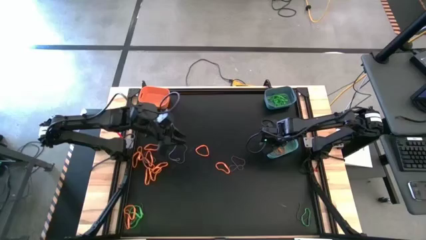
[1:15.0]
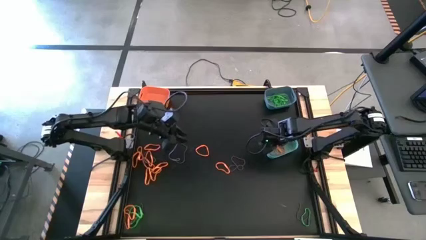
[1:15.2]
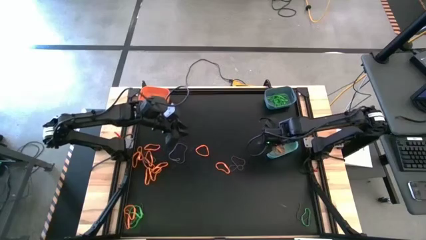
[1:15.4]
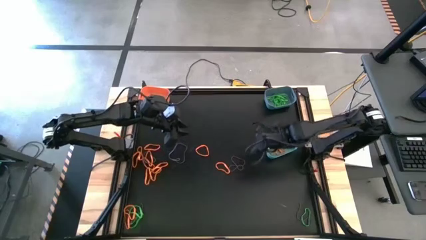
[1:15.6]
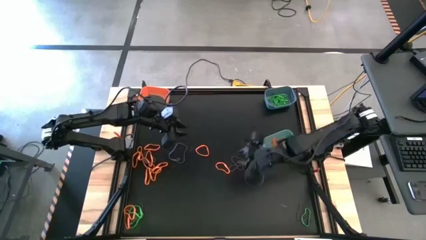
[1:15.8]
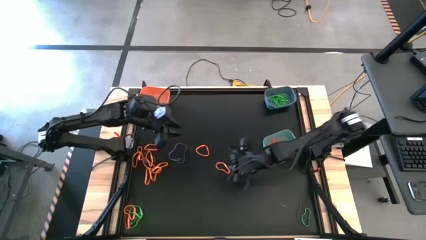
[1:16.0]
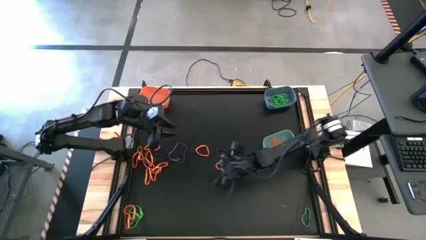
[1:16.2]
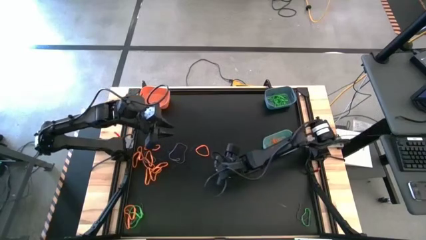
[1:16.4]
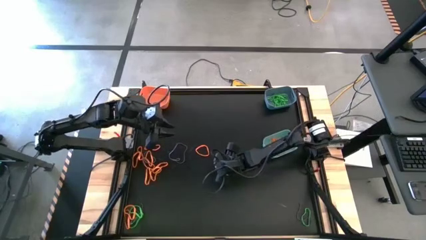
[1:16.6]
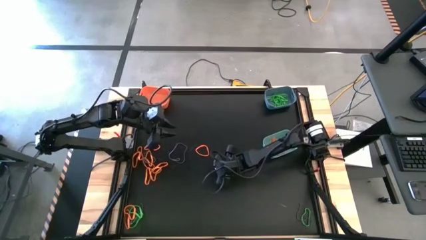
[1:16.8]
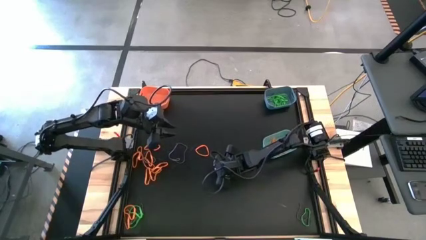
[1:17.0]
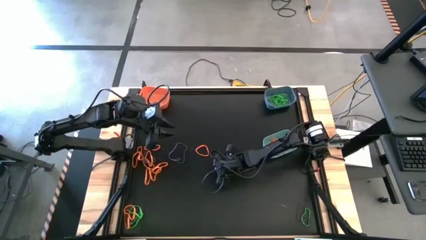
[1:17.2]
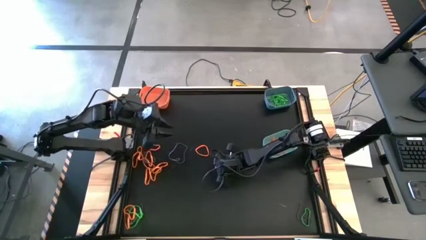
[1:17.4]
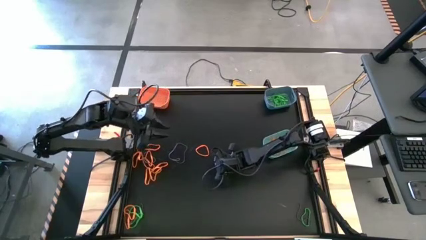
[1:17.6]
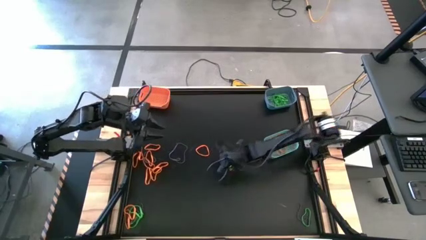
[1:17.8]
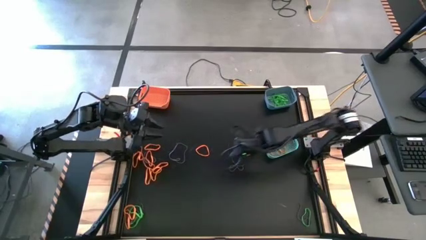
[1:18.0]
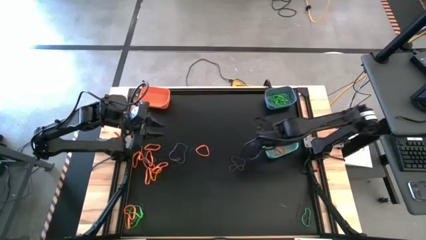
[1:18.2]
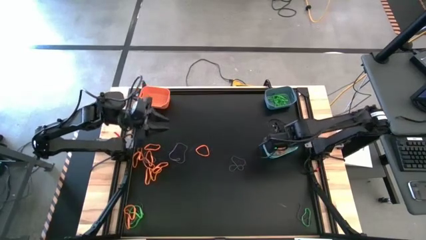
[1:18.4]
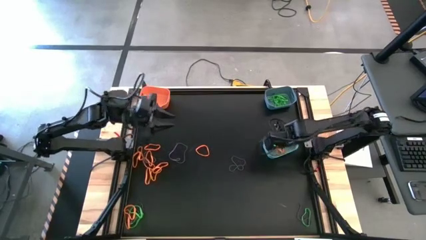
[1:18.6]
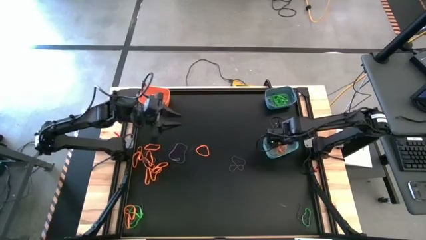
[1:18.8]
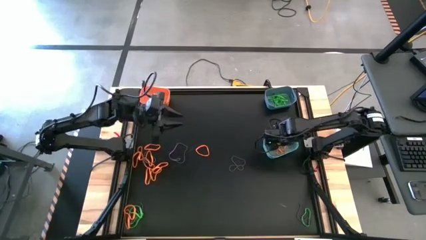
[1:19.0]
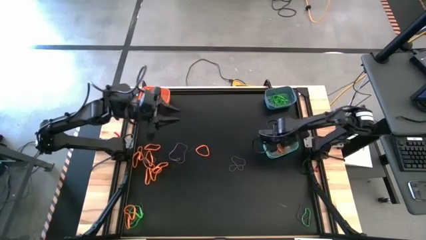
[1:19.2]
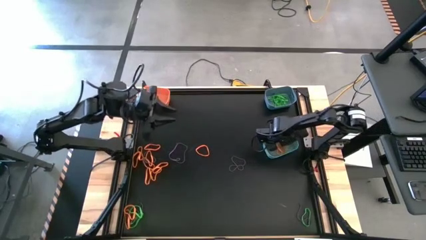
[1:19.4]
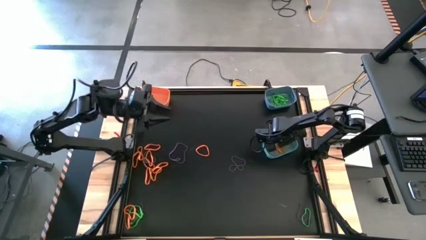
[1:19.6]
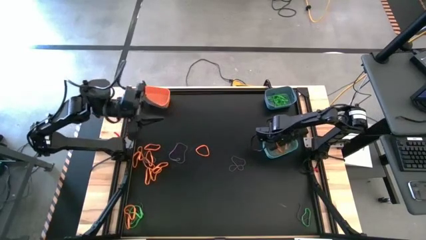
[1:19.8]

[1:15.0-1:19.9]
Task: Sort rubber bands into baskets
Put the orange rubber band into the green bin

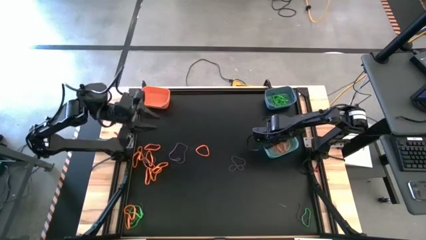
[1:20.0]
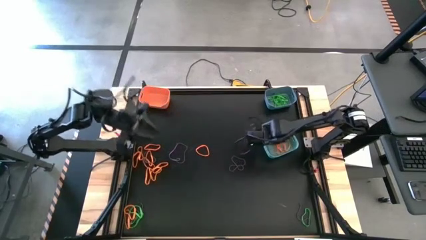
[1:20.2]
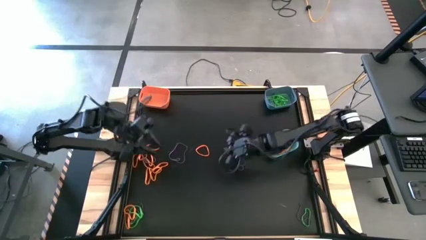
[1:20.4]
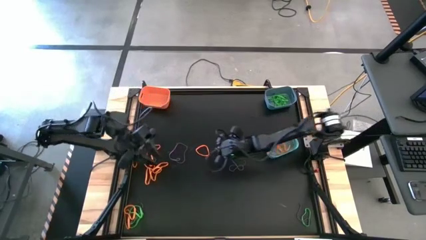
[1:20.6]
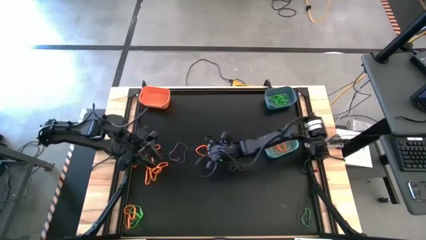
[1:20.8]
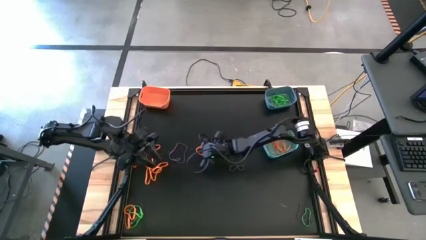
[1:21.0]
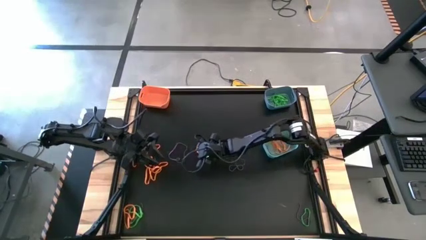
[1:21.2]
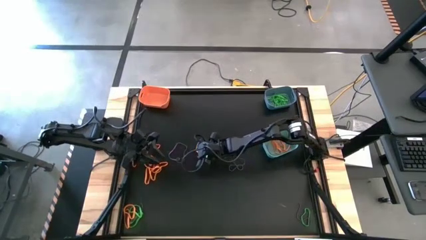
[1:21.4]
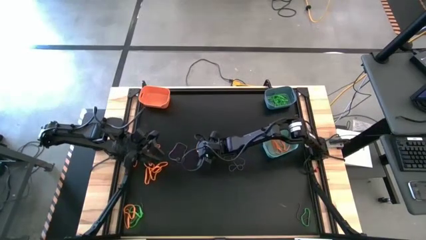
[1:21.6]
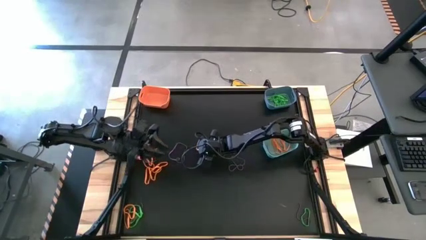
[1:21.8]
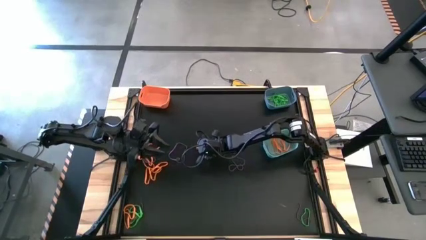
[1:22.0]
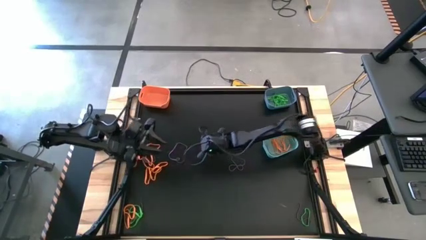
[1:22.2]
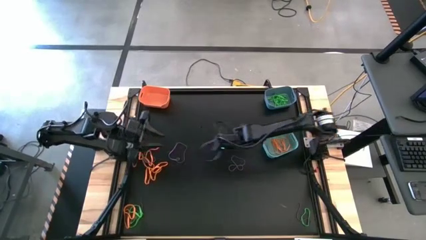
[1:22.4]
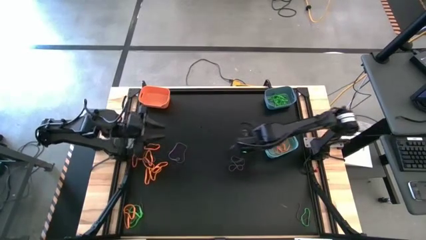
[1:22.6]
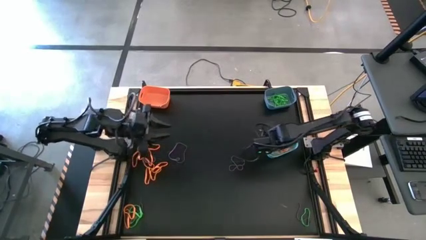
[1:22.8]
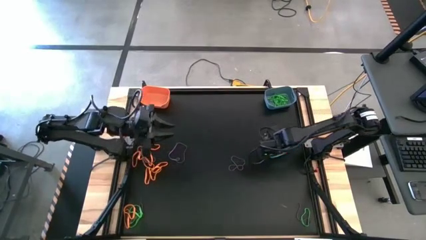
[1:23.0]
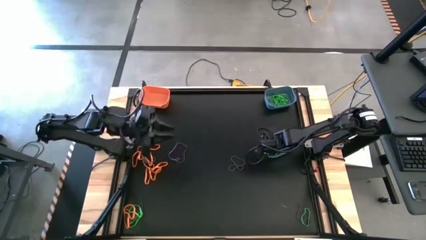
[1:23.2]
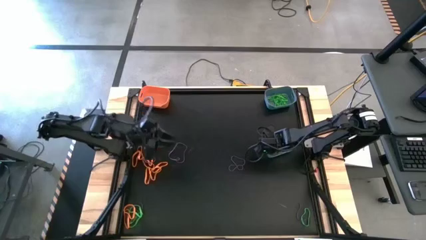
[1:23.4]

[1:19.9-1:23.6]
Put the orange rubber band into the green bin

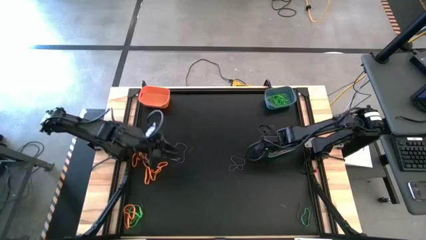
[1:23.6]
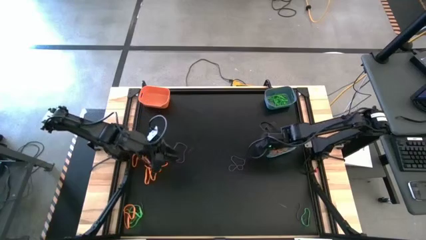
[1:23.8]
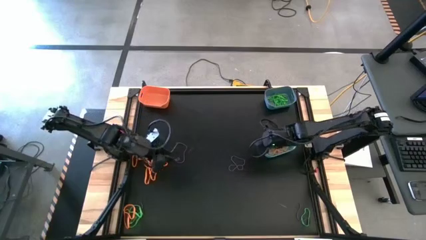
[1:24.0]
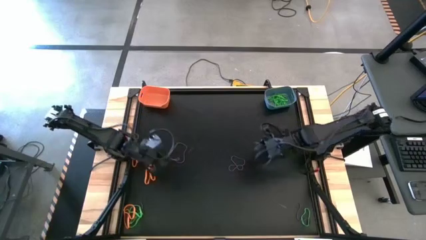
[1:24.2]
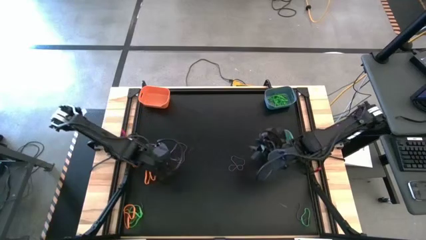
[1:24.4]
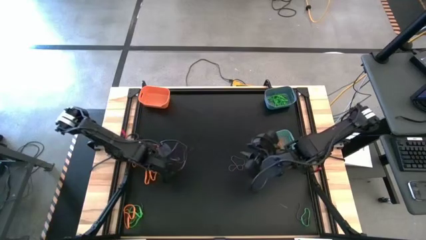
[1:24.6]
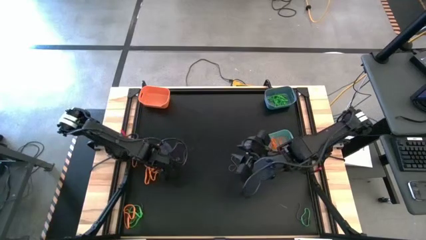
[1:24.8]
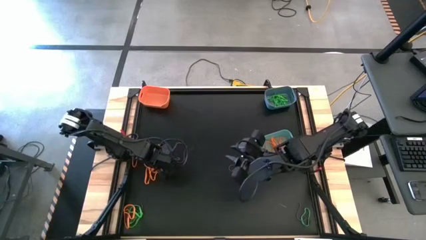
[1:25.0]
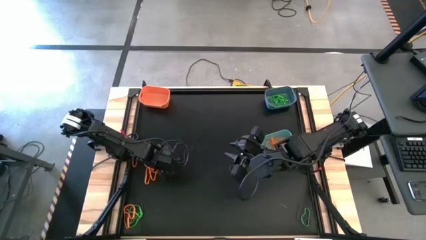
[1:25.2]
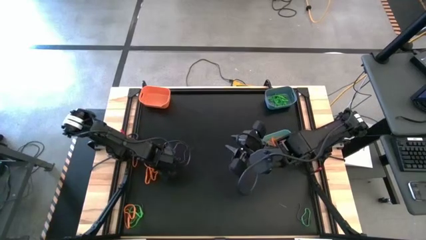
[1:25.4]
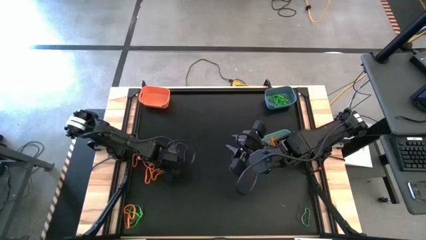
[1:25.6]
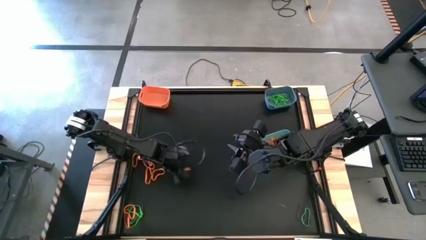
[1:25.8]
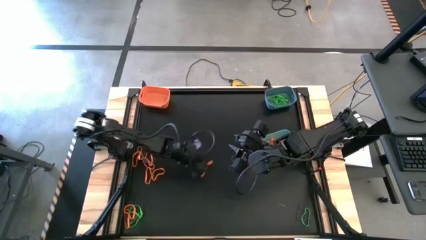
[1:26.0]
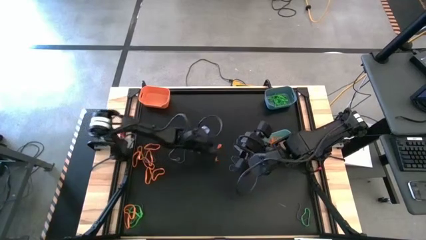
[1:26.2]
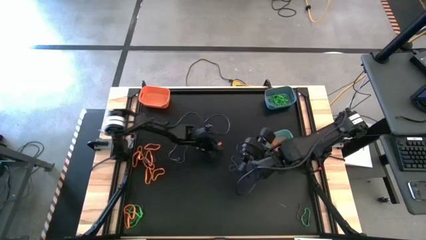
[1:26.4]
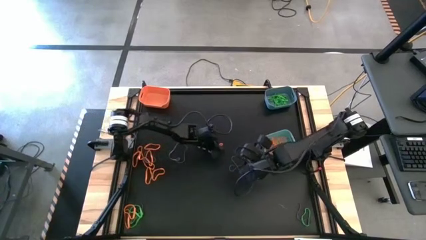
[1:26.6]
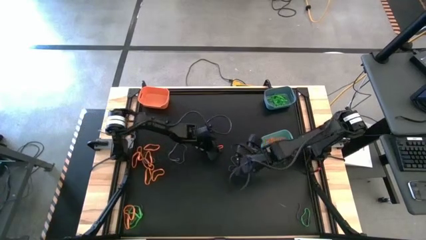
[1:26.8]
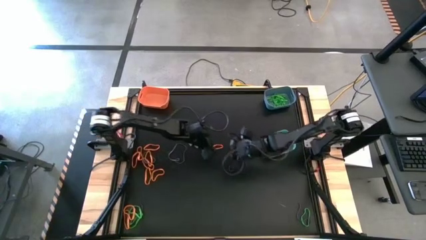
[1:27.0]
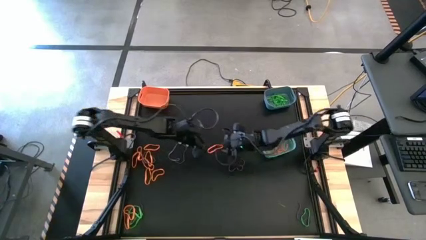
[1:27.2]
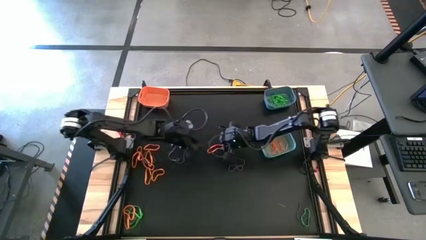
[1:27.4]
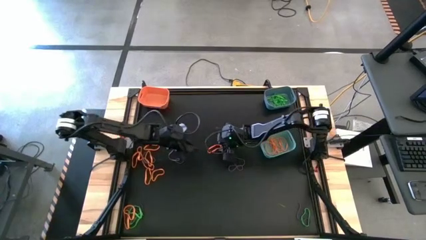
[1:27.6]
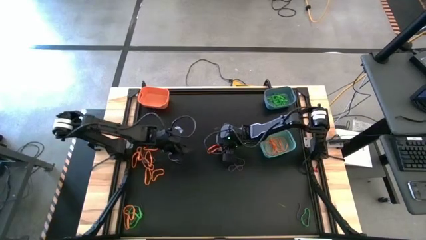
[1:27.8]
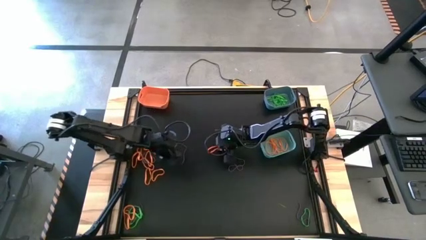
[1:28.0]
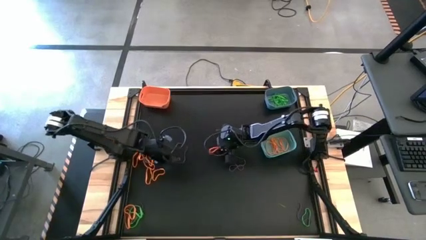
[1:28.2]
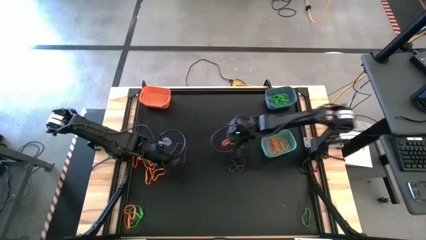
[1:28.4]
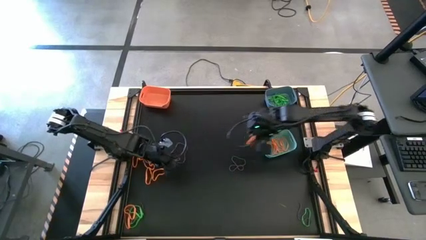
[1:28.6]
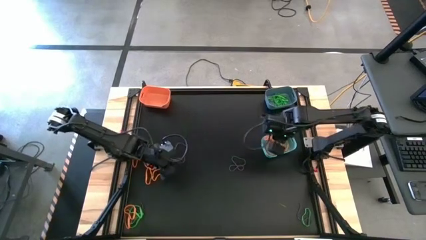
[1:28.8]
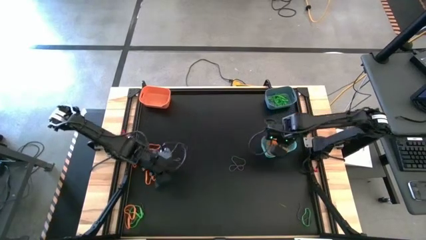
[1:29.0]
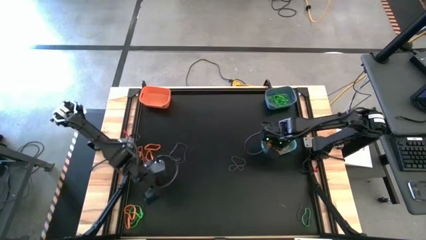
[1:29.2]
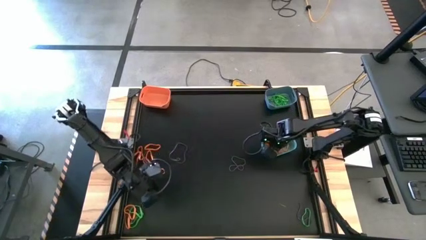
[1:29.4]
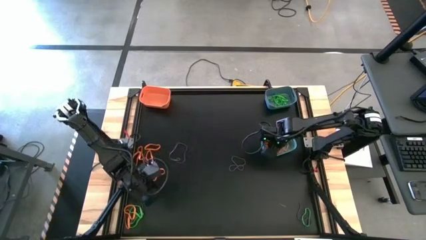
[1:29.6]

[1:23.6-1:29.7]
Put the orange rubber band into the green bin

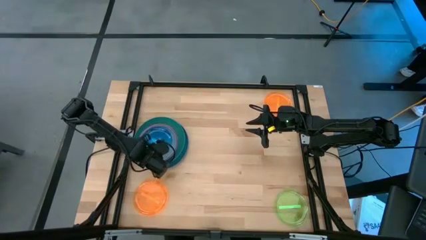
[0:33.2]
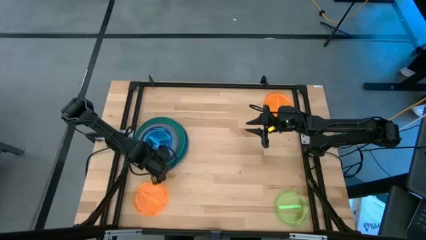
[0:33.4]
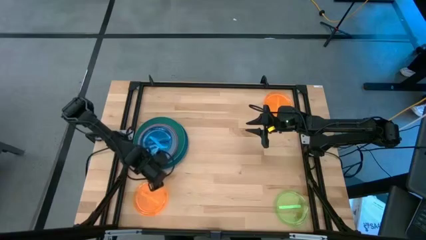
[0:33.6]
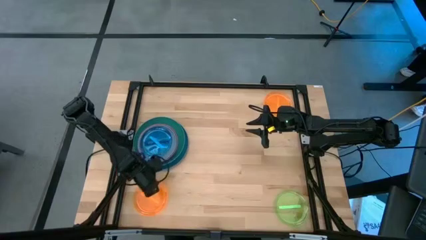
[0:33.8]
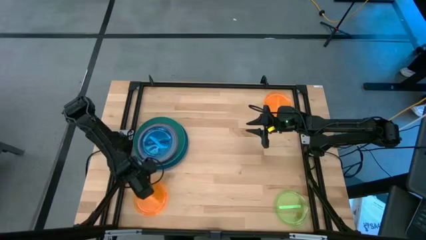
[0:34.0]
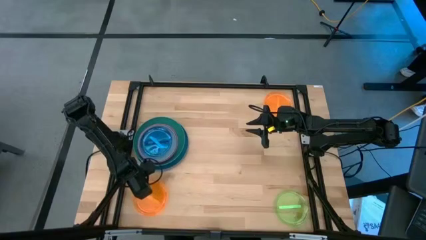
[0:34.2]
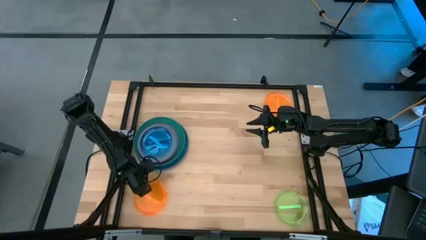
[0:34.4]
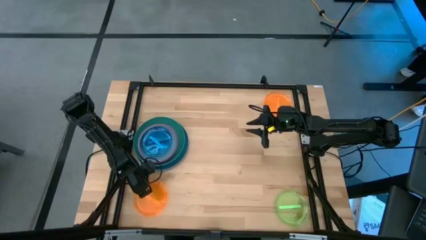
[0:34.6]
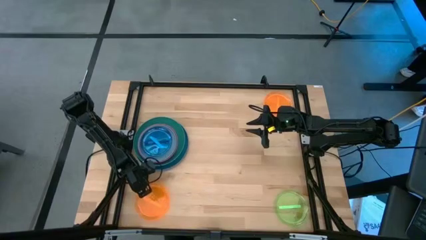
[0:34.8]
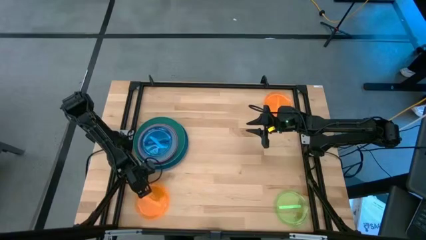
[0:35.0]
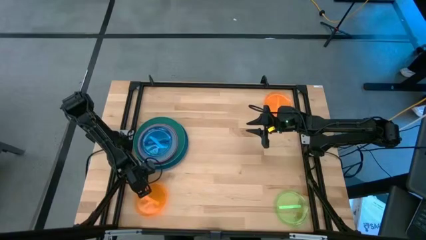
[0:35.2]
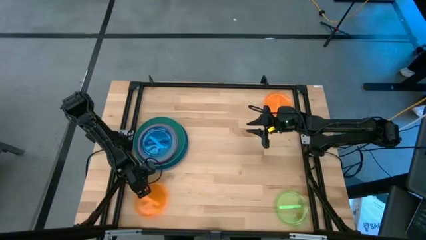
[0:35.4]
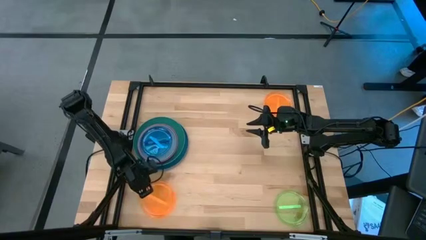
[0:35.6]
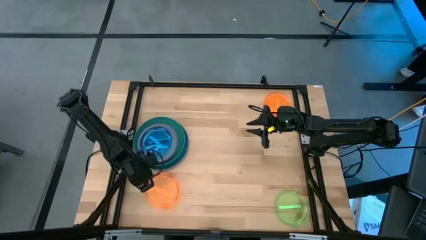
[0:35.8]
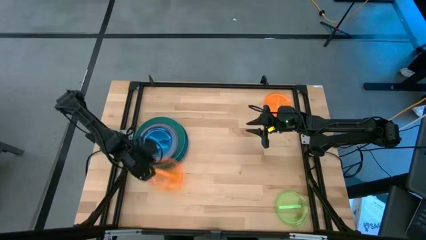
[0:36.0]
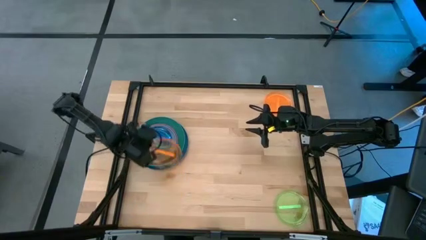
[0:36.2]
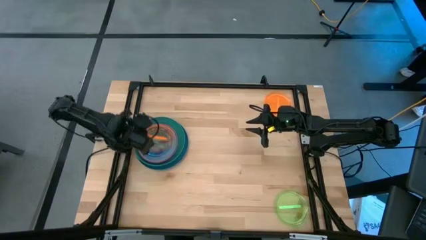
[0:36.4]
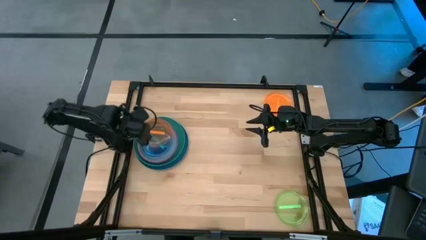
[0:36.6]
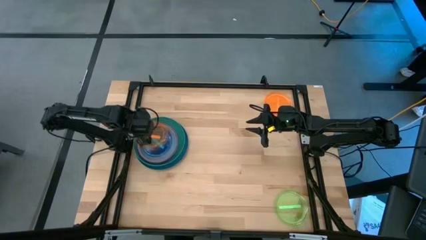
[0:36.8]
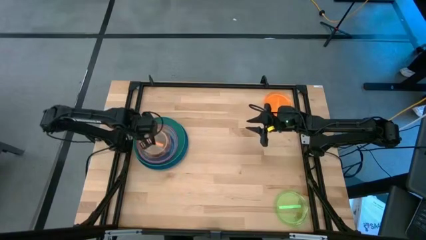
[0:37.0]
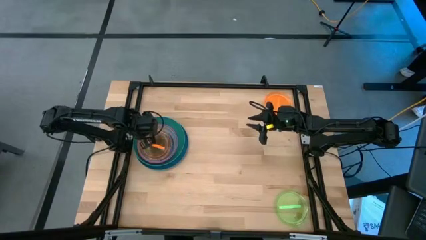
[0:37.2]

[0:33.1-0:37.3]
Task: Stack plastic plates
Stack the bottom orange plate on top of the blue plate
